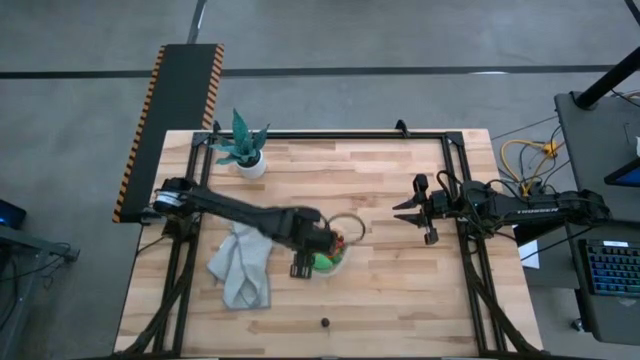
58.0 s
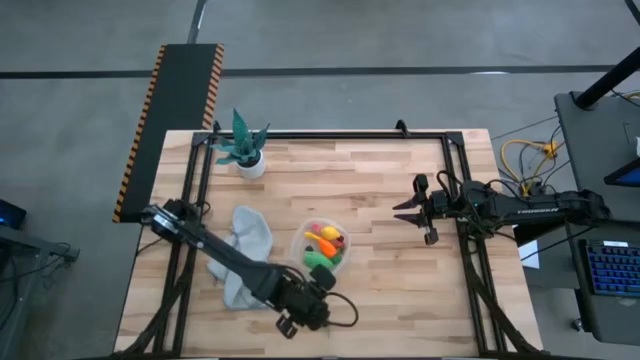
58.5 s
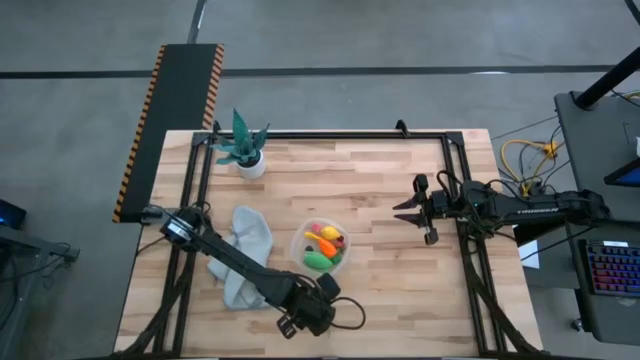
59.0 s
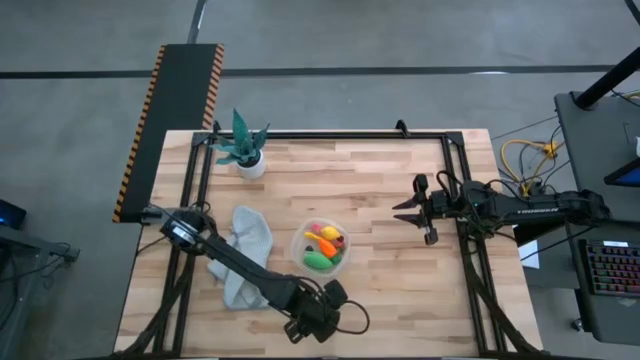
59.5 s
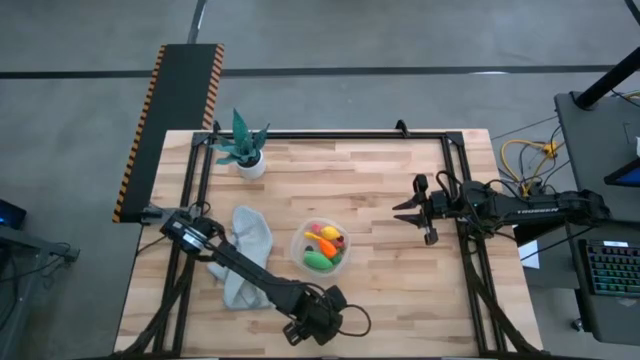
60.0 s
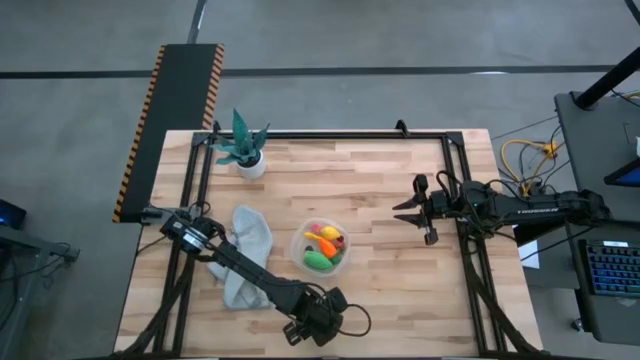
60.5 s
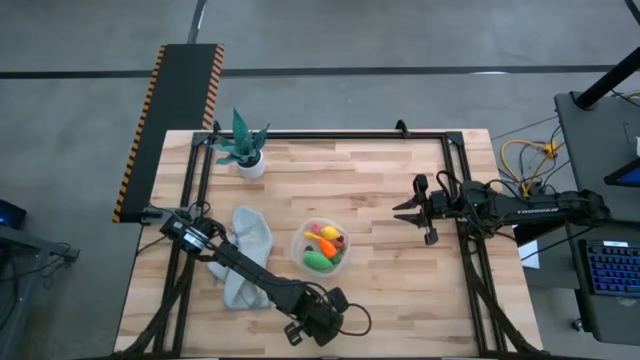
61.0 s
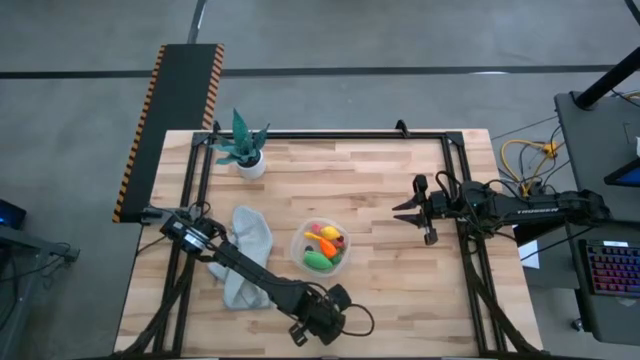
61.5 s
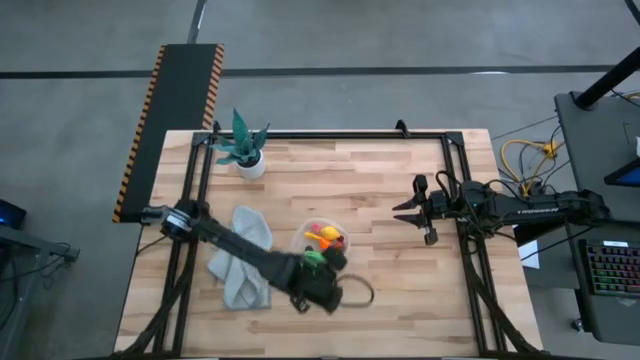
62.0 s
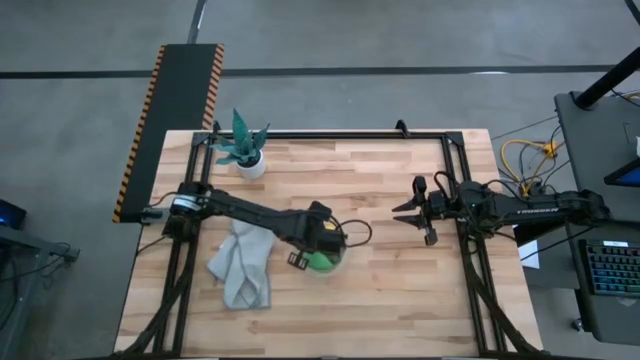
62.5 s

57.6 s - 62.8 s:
Task: Pick and placing Produce into tupperware
Put the black cherry into the transparent bin

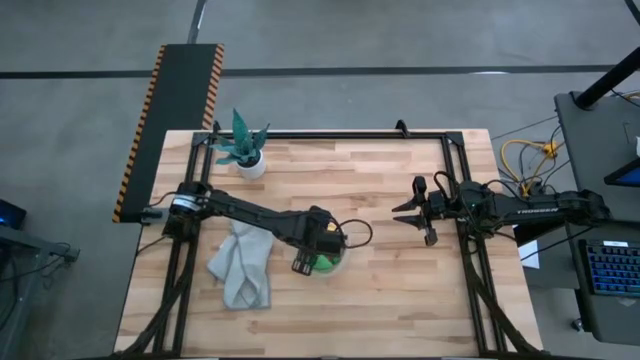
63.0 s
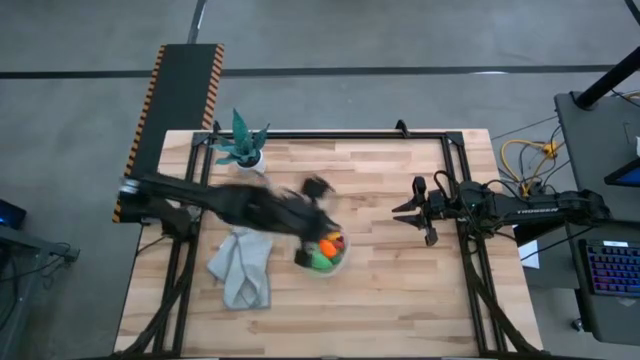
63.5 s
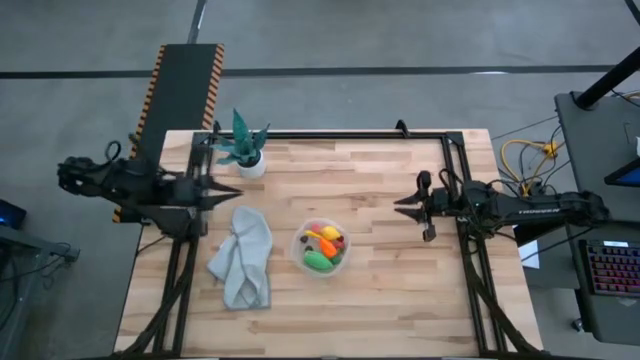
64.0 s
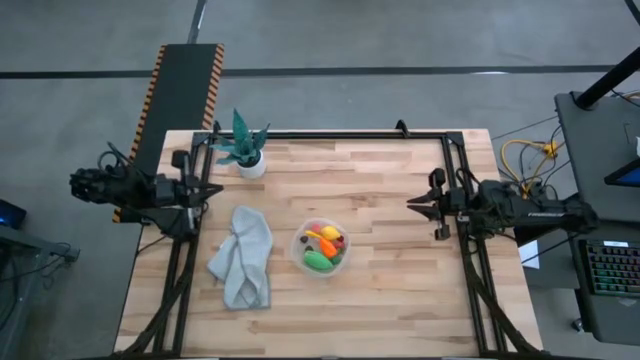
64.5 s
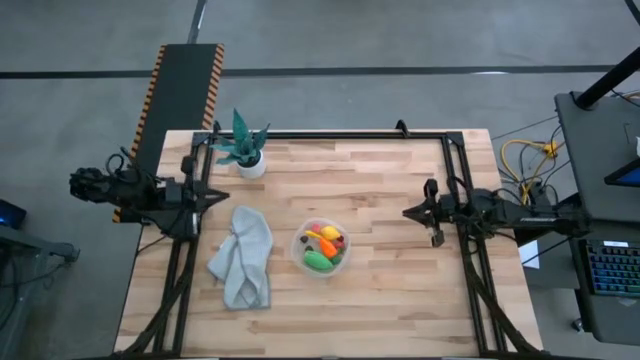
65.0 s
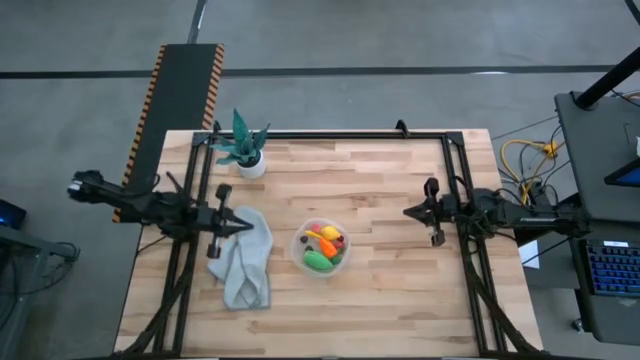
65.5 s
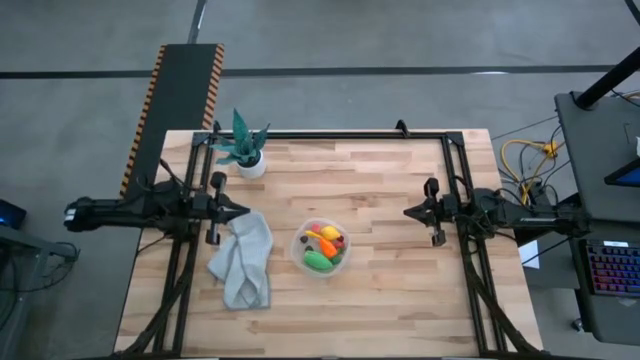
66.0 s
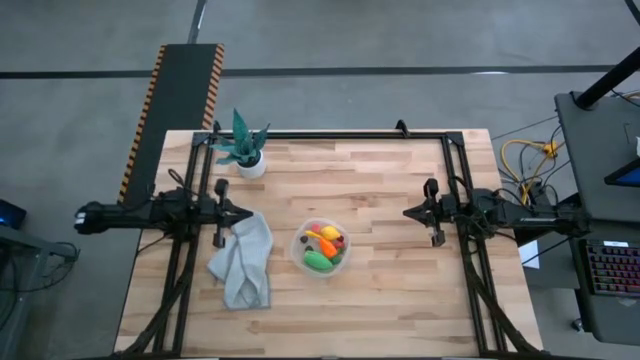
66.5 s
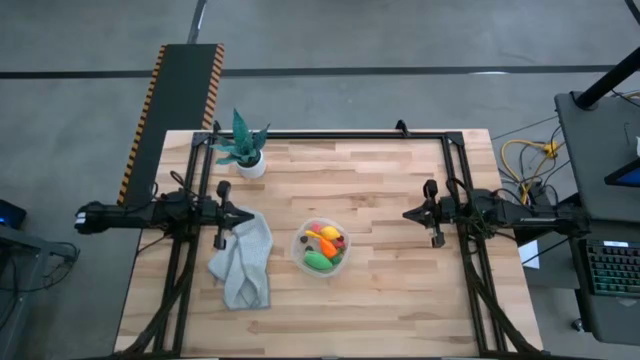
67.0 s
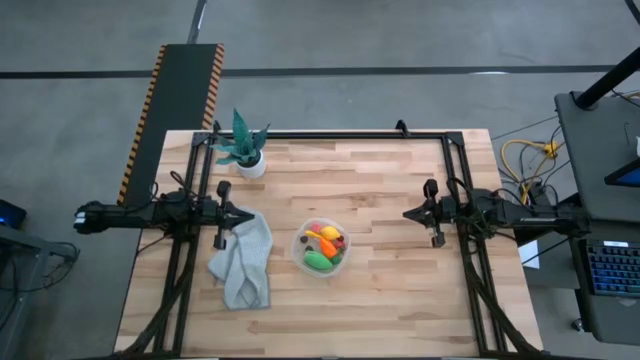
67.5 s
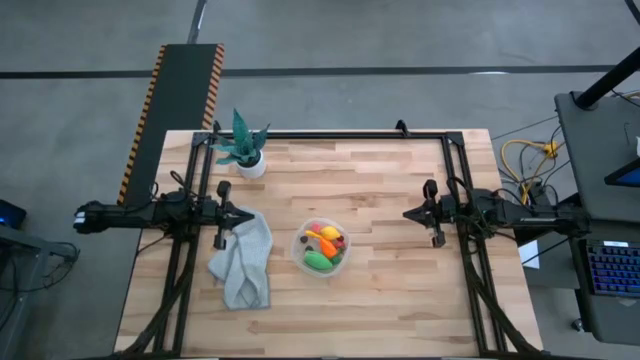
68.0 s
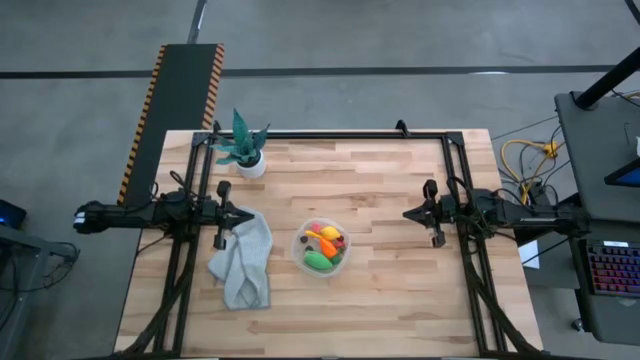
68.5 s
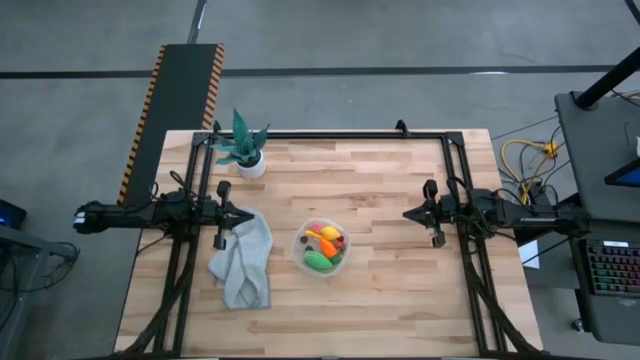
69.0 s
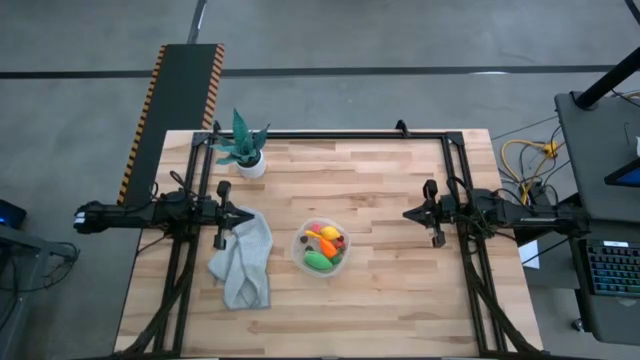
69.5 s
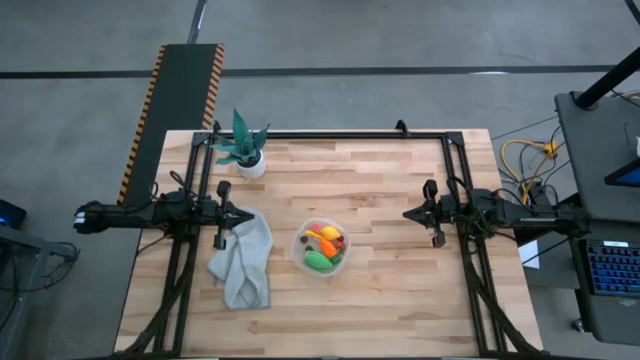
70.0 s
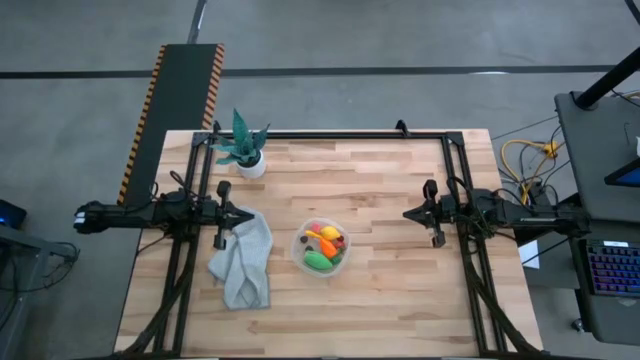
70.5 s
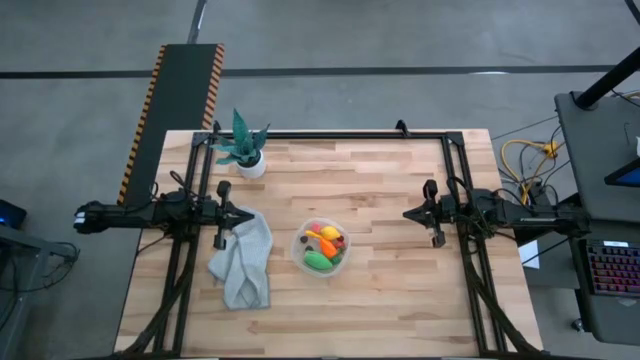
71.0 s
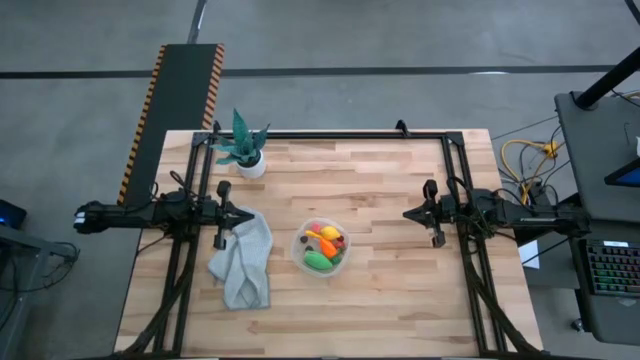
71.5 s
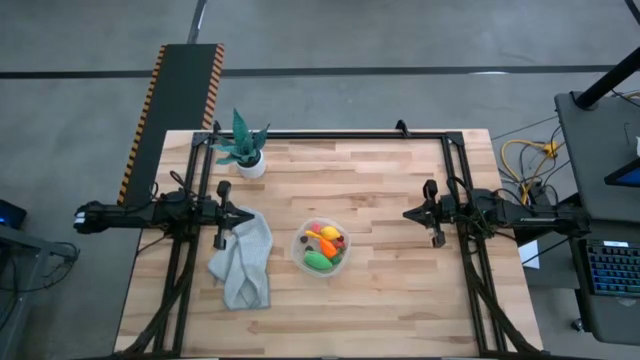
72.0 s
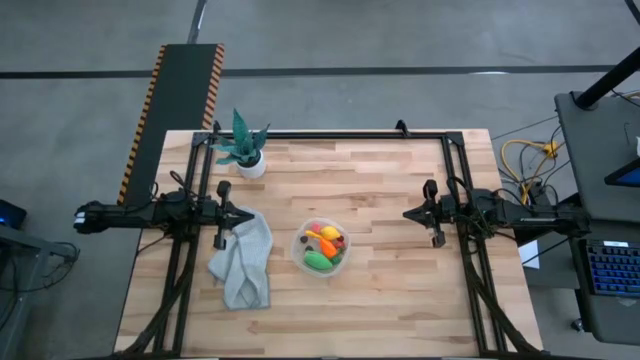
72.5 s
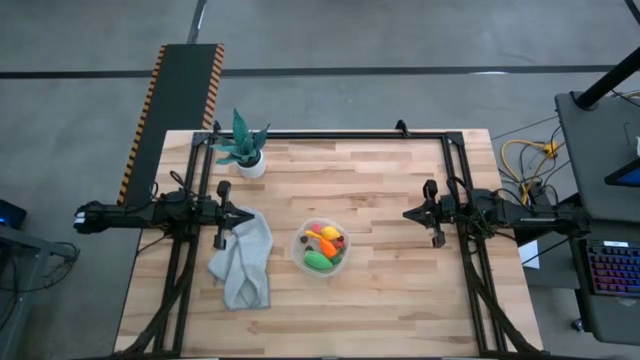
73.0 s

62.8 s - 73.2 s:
Return to Home Position

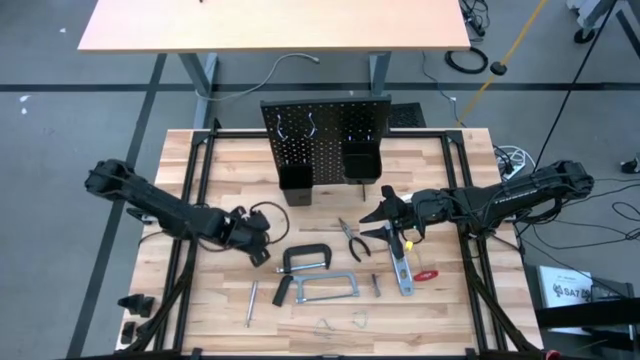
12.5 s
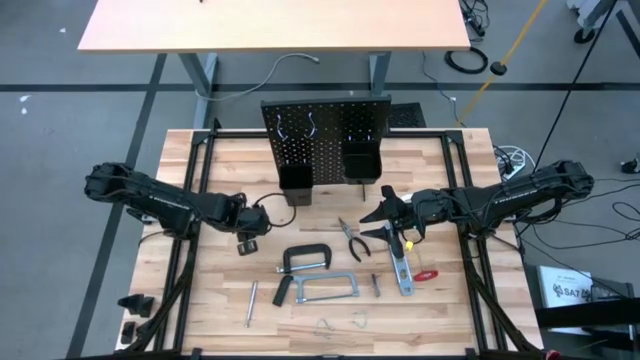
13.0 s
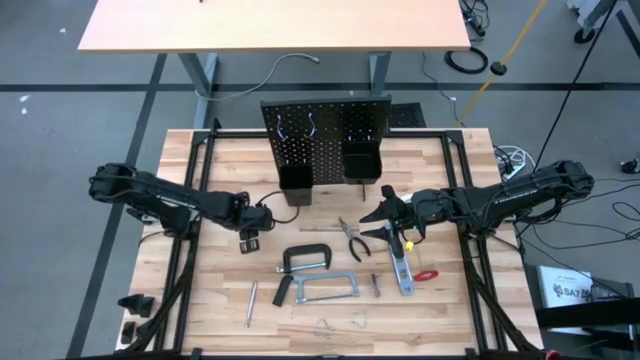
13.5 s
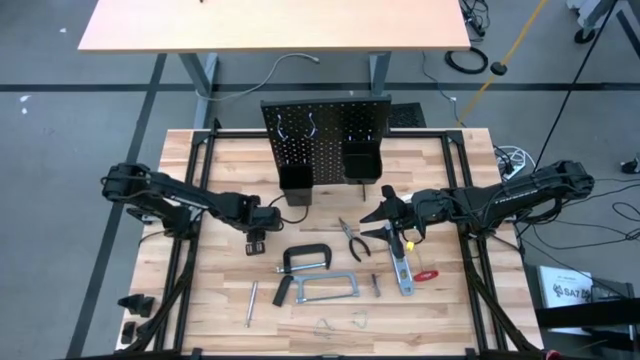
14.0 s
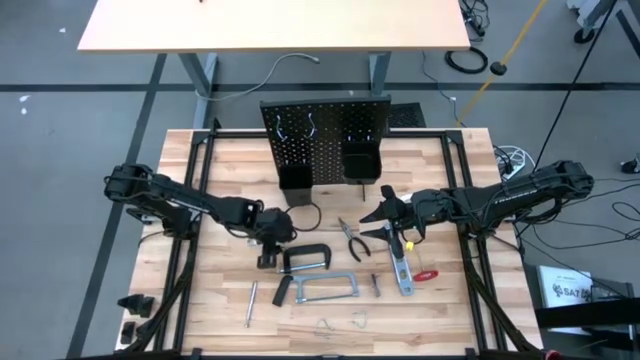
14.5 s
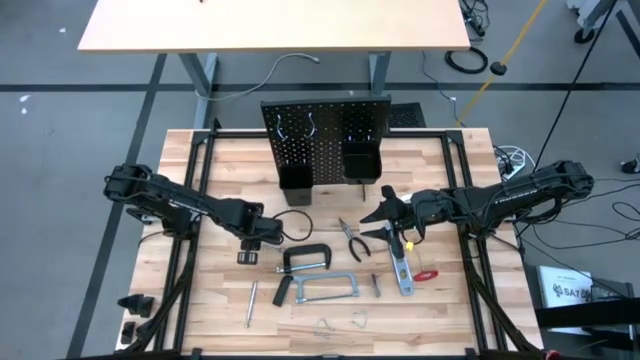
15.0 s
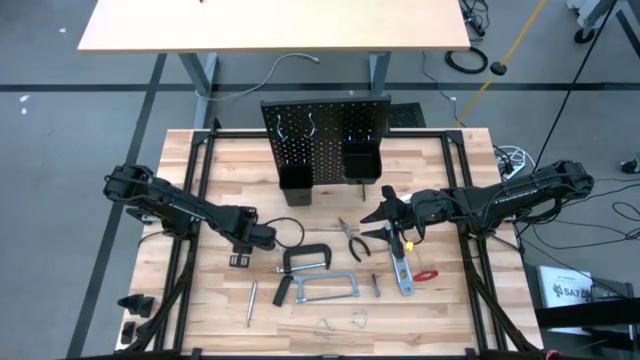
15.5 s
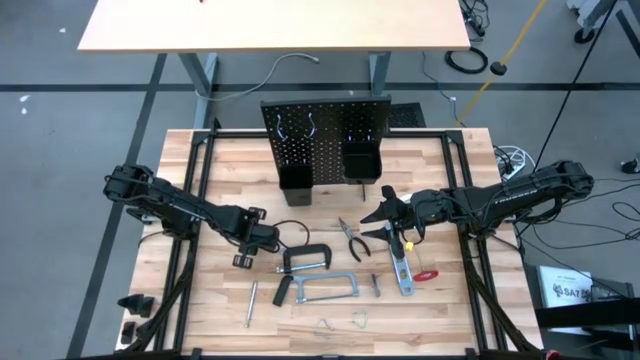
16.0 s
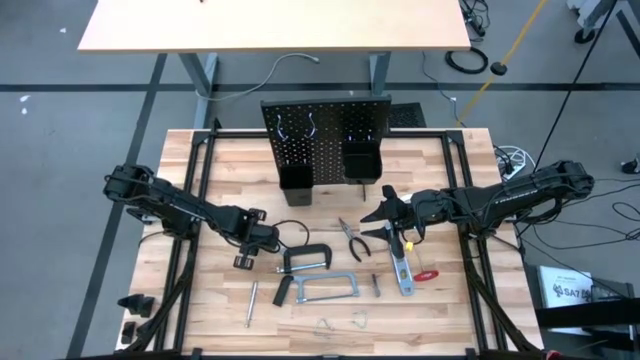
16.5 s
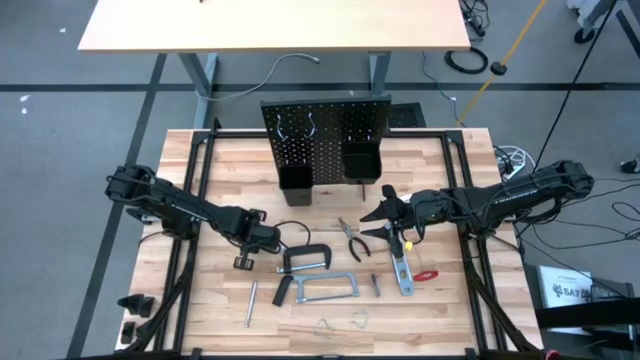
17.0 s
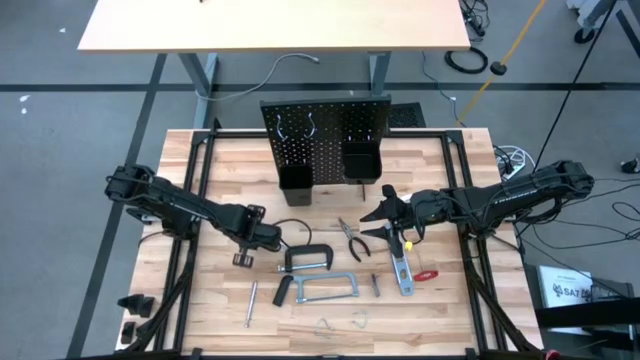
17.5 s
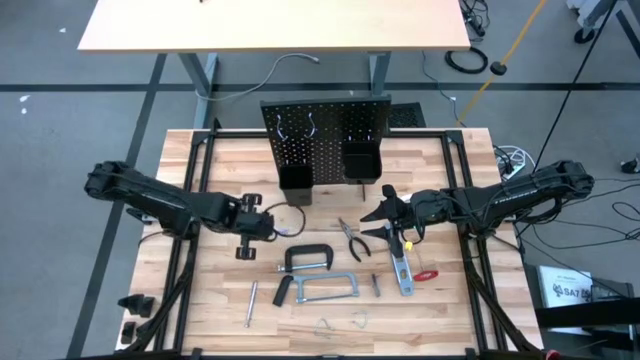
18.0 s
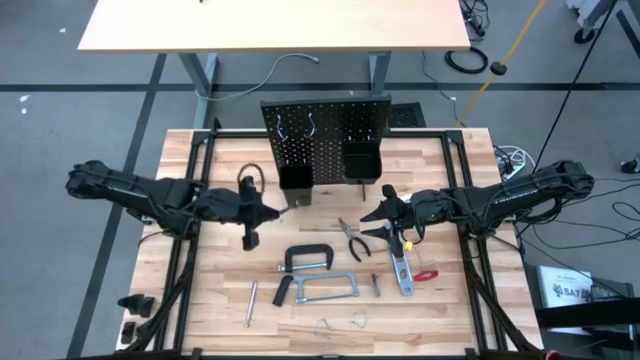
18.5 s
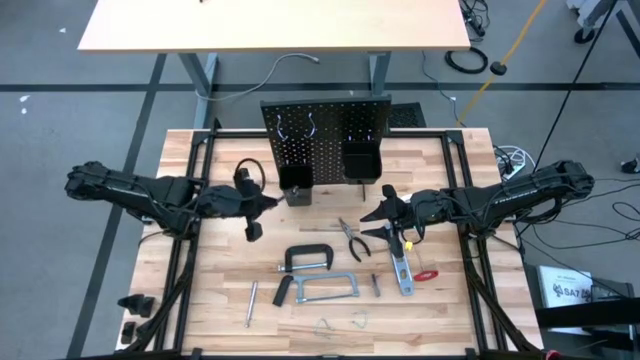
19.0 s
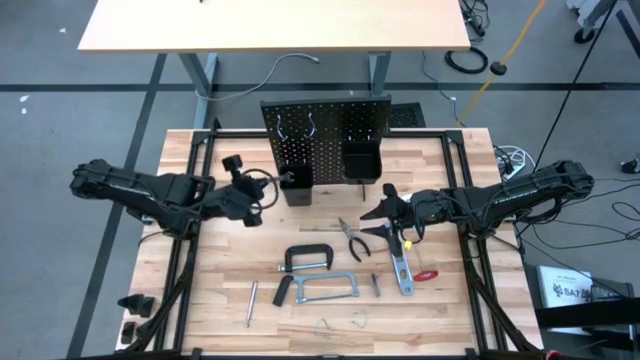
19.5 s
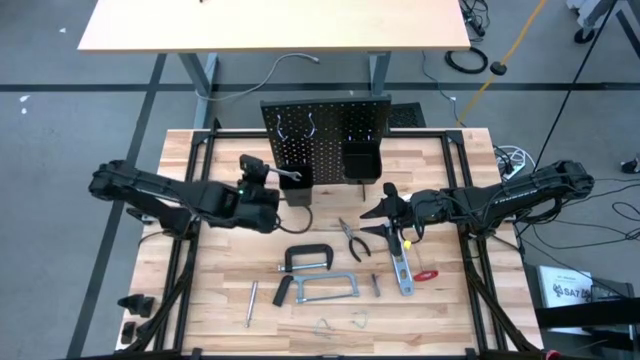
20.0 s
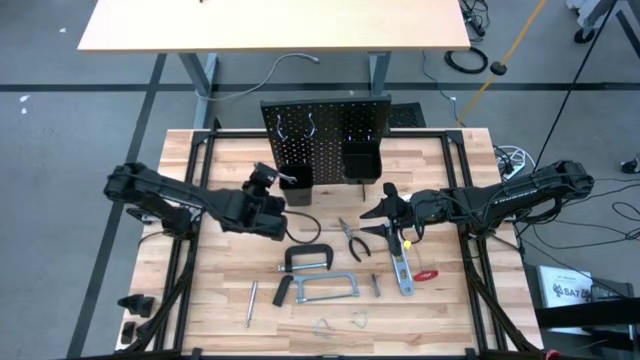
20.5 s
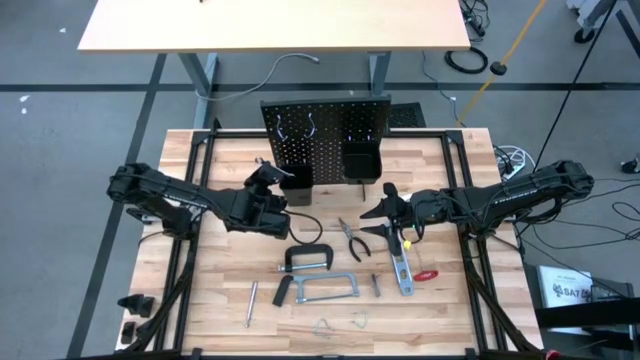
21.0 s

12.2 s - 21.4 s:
Task: Hang tools onto peg board
Put the wrench into the bottom black bin on the peg board
